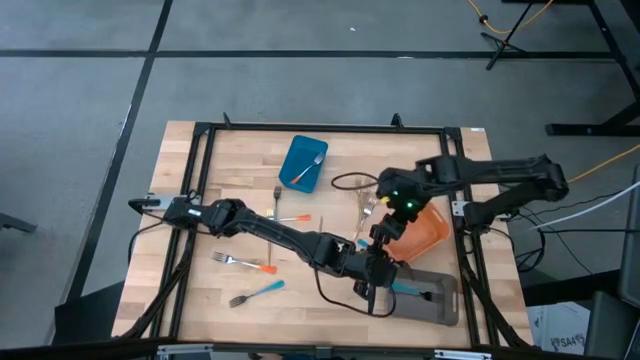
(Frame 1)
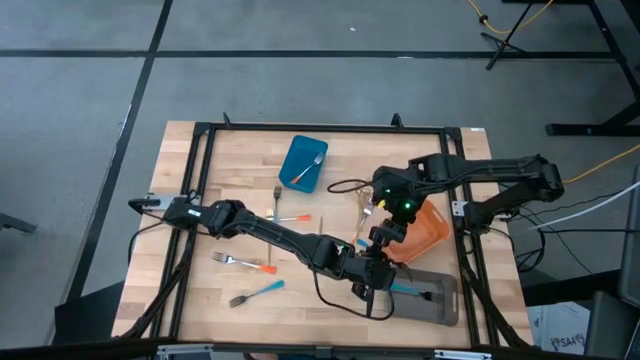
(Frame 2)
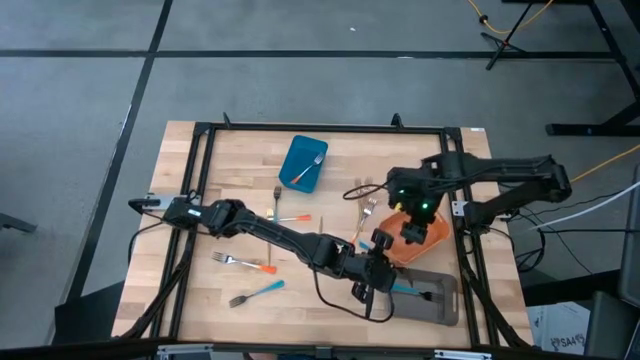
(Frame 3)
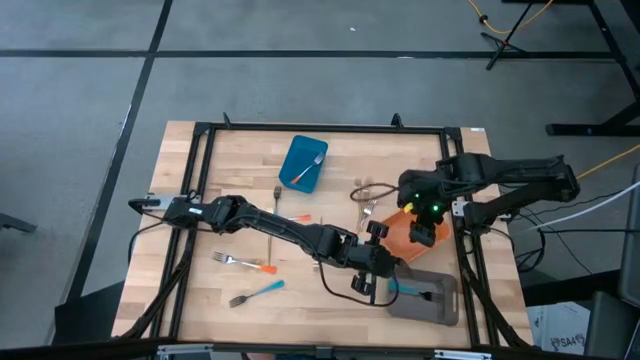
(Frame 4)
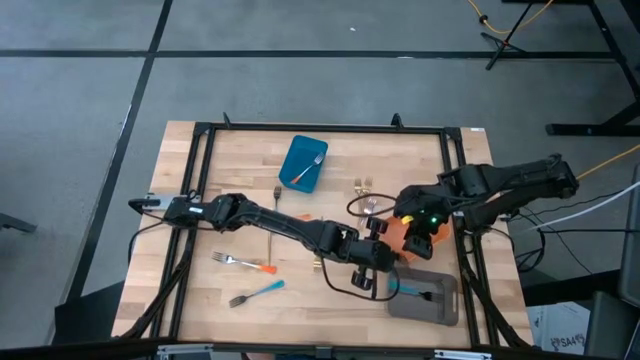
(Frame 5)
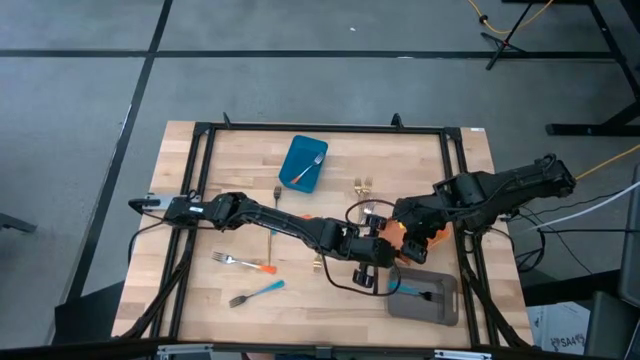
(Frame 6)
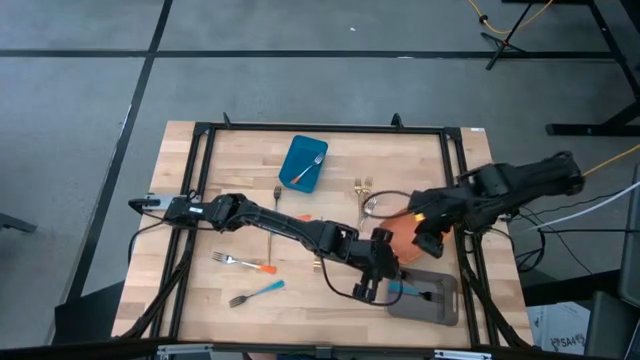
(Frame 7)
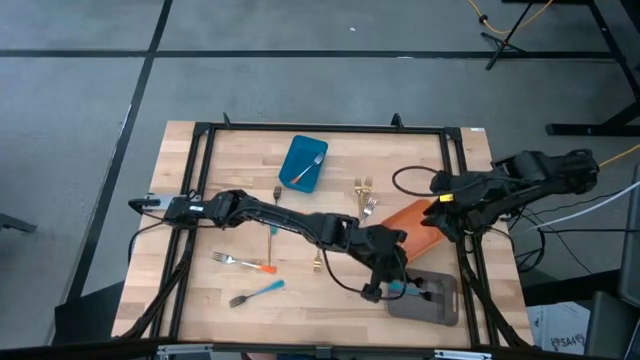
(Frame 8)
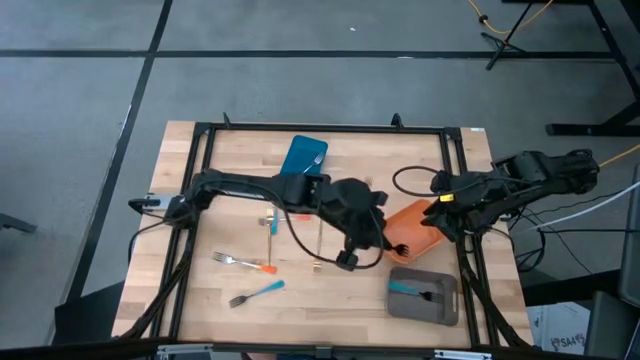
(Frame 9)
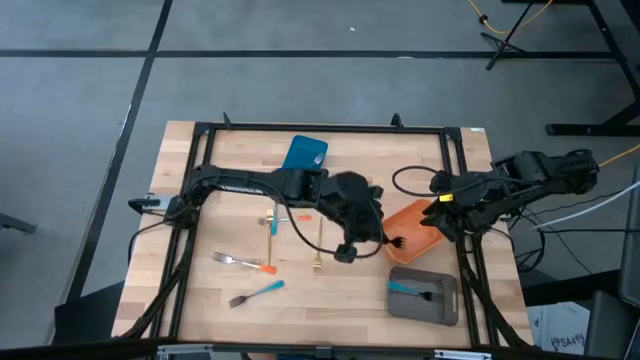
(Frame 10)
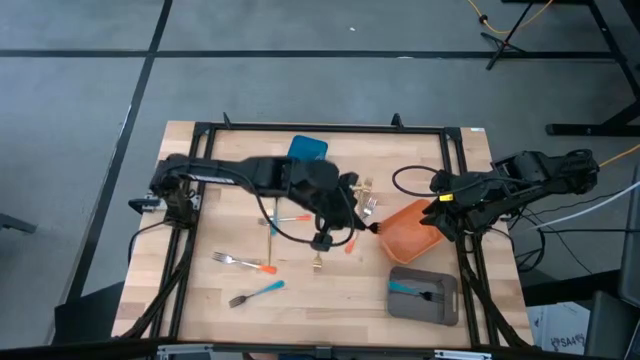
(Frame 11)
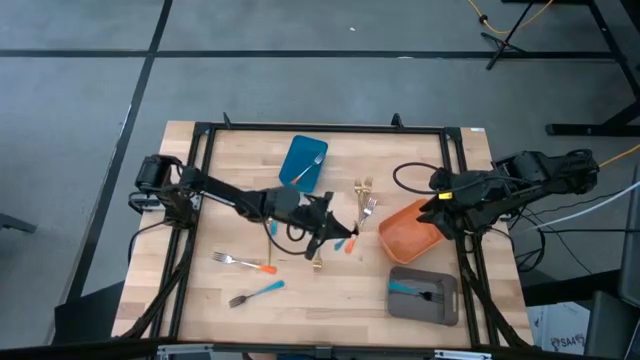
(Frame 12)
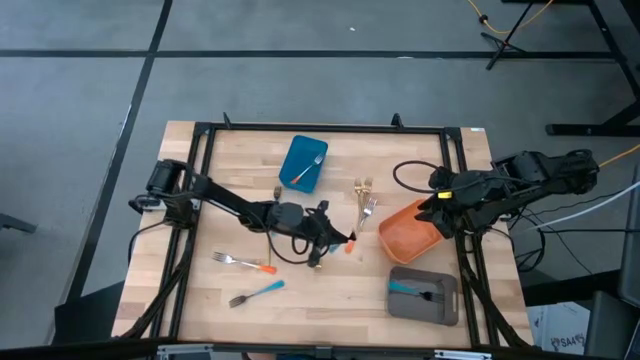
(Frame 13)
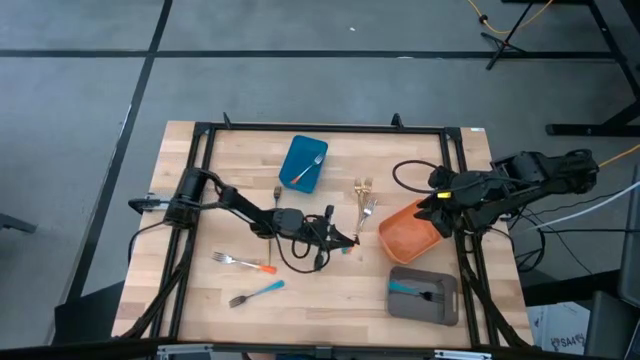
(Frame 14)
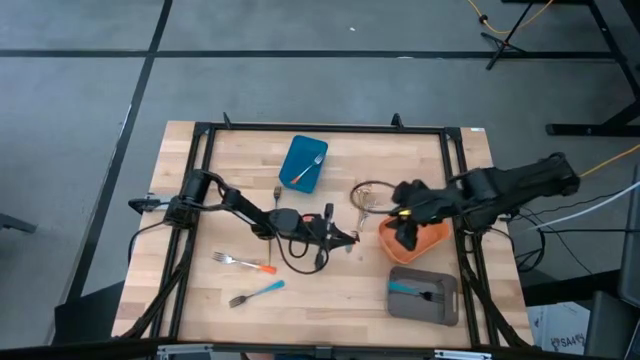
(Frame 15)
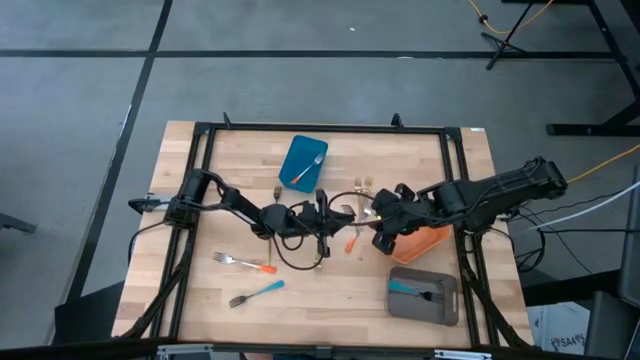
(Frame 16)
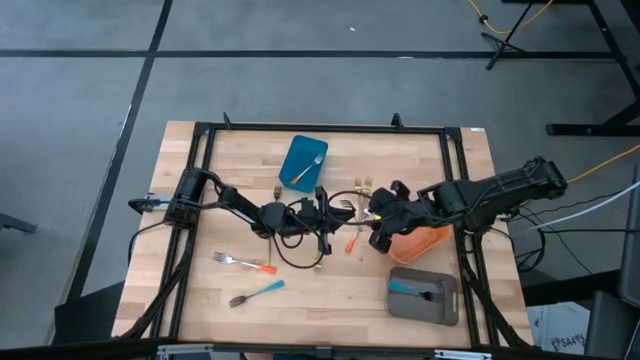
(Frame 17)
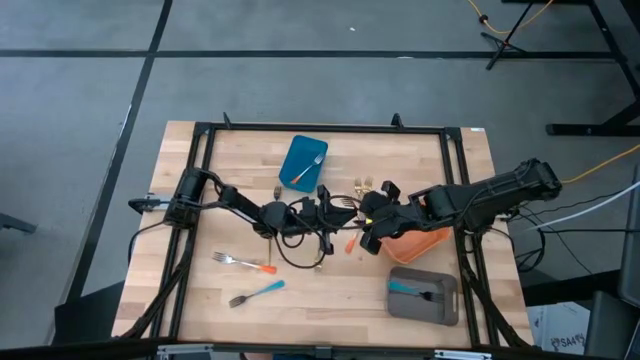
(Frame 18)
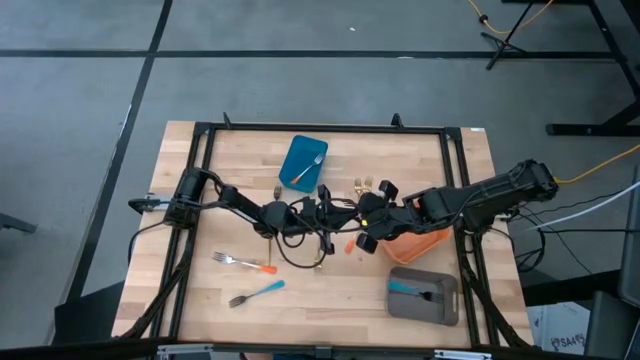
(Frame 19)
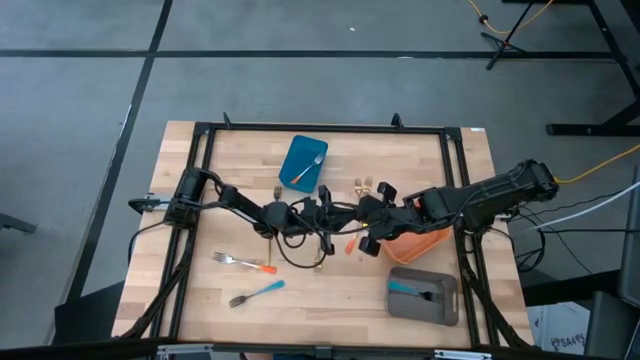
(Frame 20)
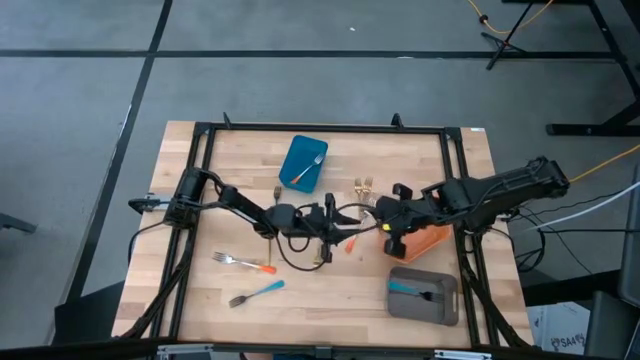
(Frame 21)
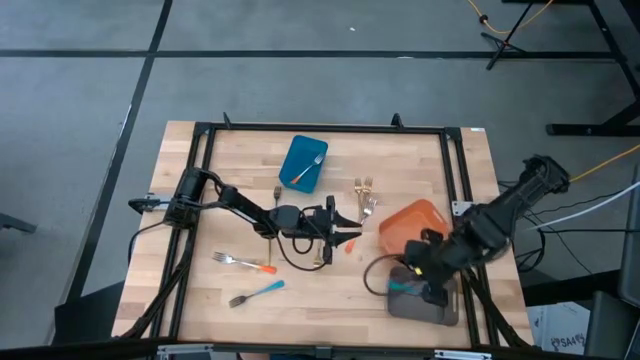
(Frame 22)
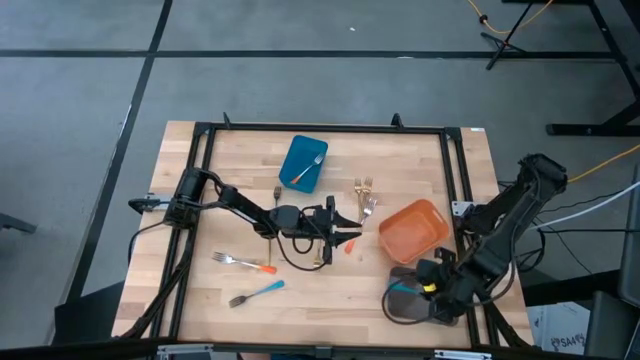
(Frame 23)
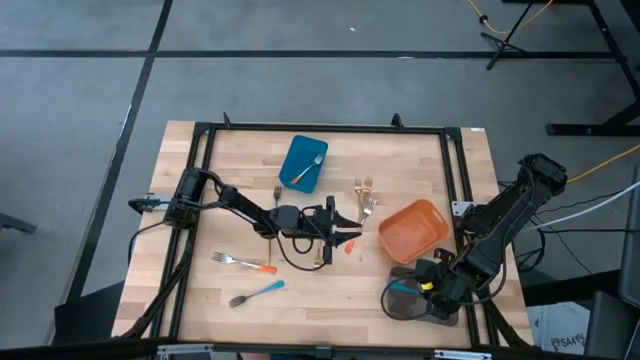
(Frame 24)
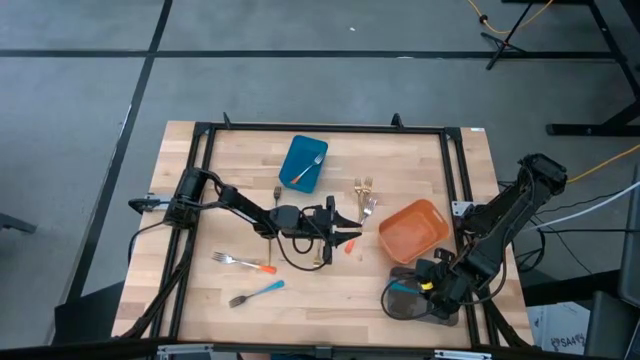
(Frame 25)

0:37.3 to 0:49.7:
Task: Sort silverware by color (type)
Put the right blue fork into the black bin

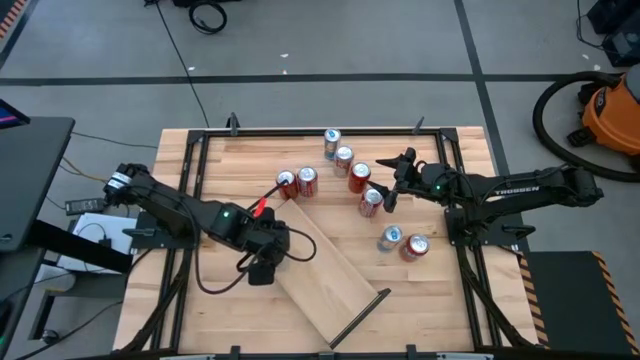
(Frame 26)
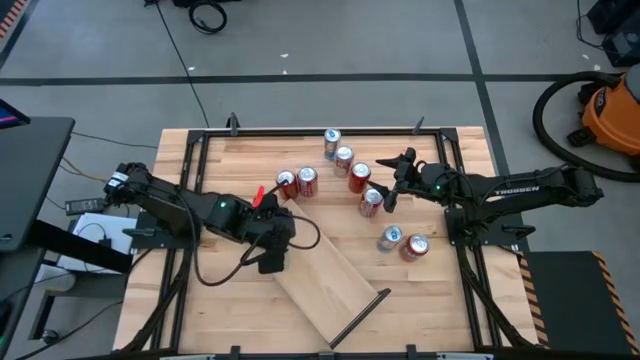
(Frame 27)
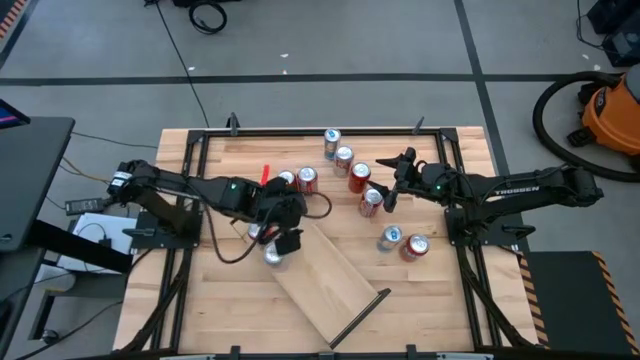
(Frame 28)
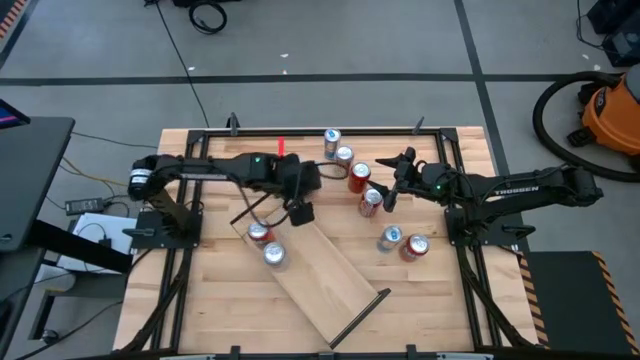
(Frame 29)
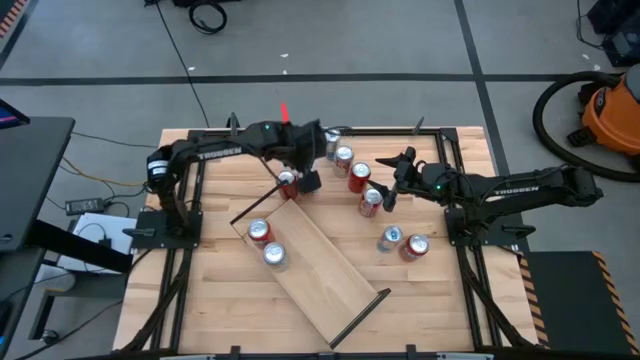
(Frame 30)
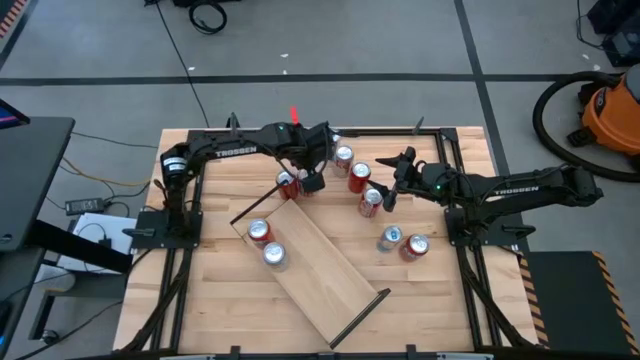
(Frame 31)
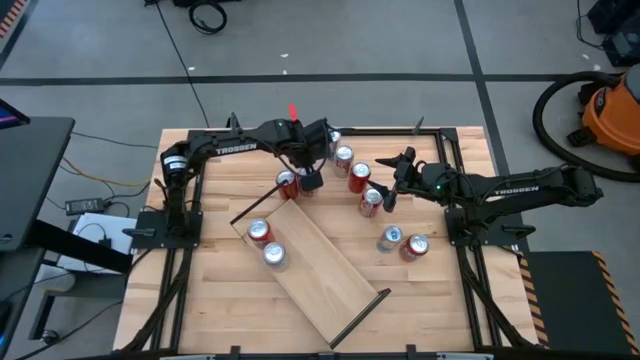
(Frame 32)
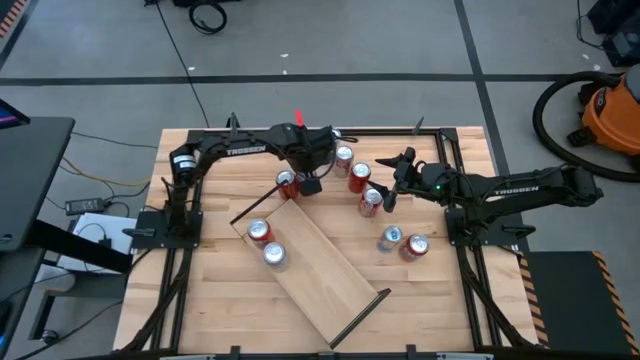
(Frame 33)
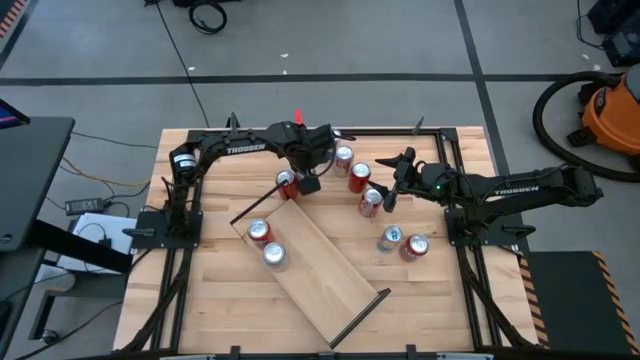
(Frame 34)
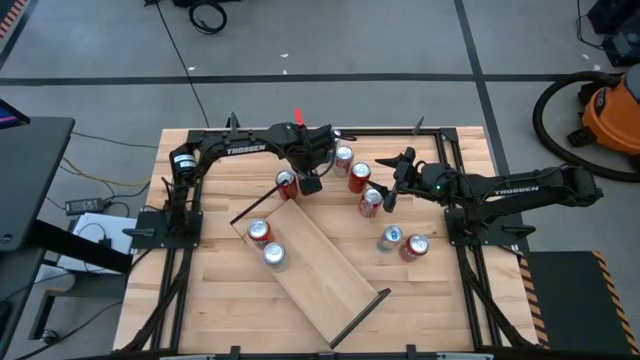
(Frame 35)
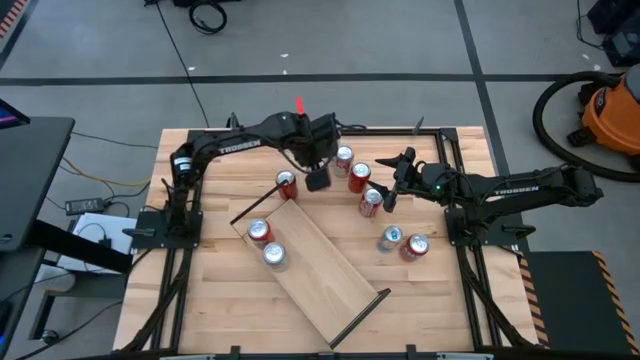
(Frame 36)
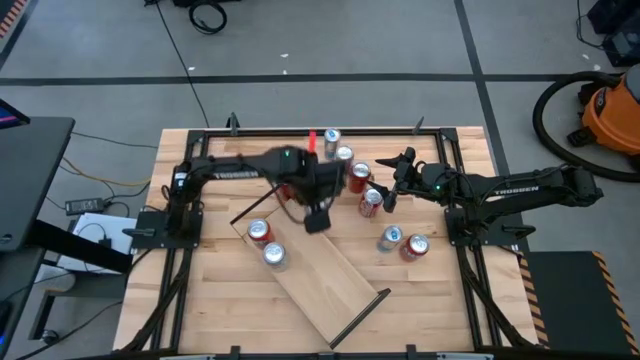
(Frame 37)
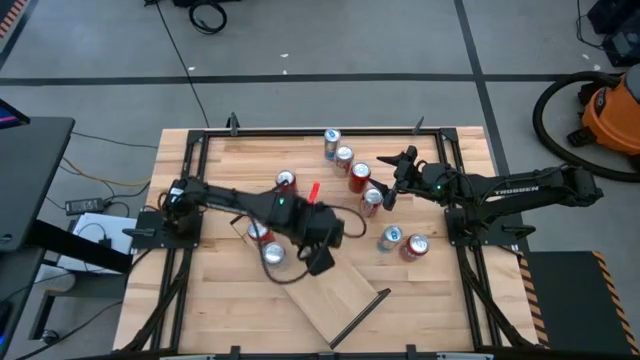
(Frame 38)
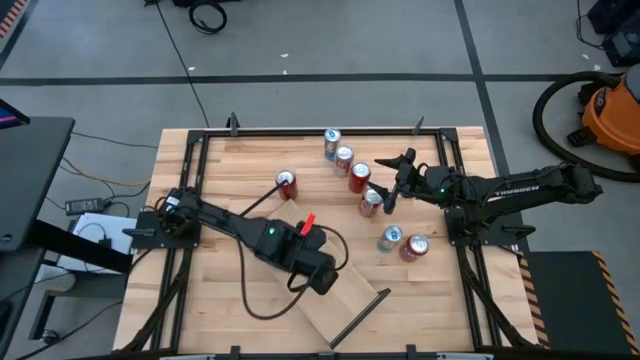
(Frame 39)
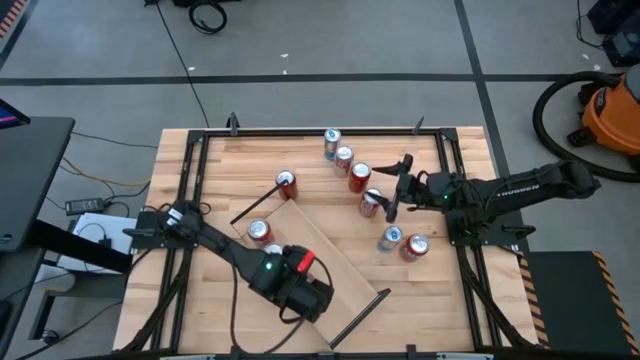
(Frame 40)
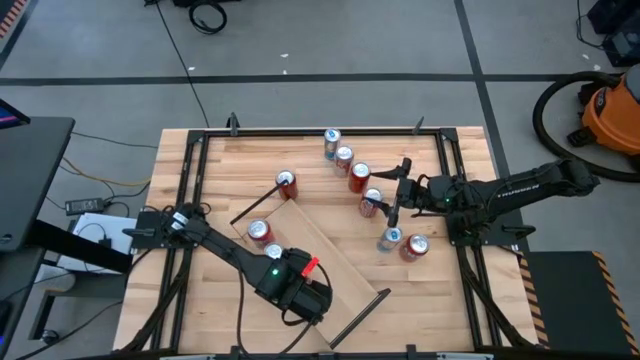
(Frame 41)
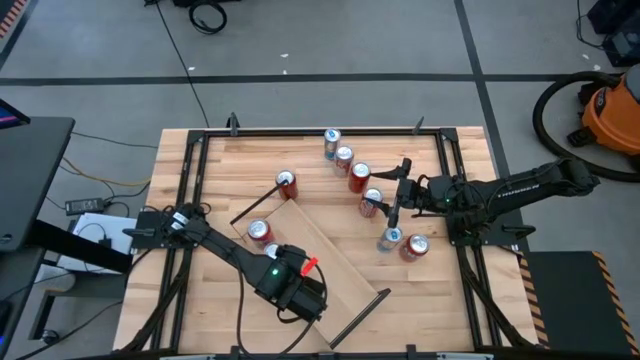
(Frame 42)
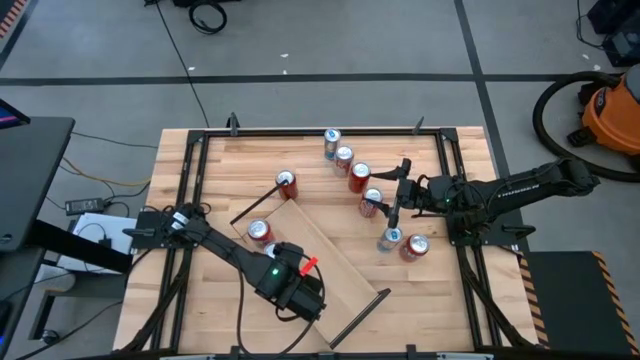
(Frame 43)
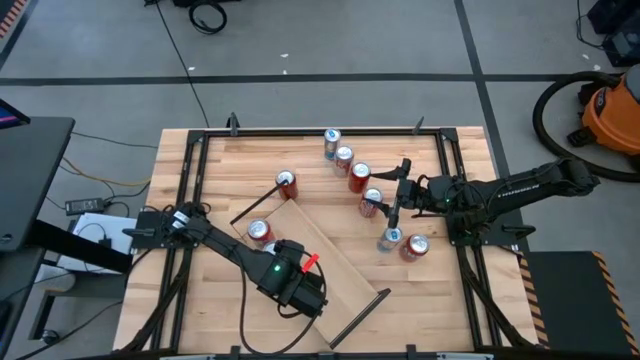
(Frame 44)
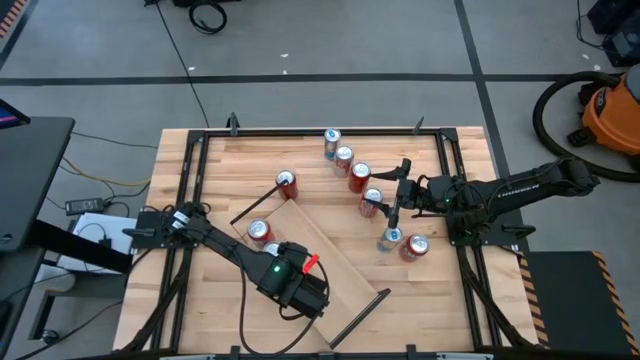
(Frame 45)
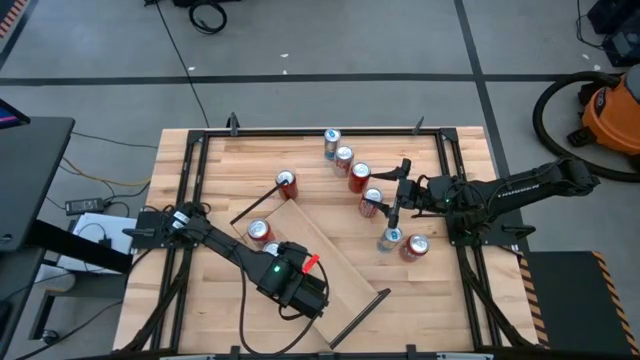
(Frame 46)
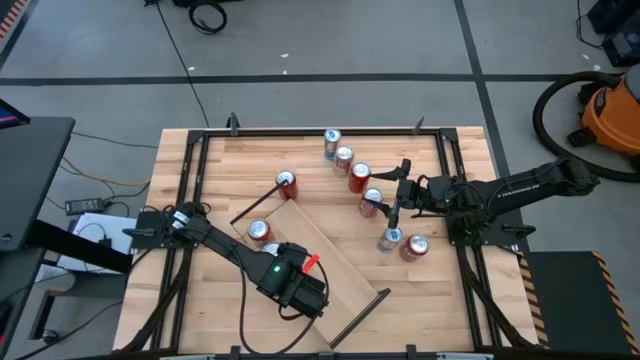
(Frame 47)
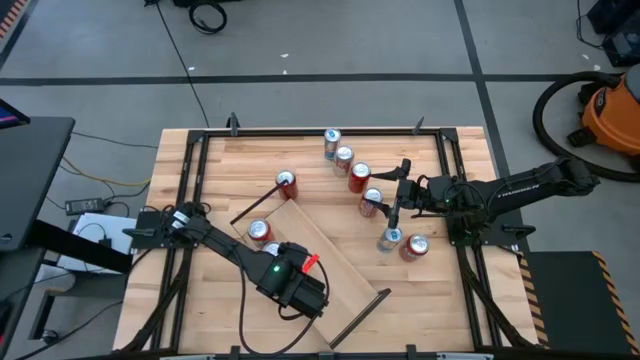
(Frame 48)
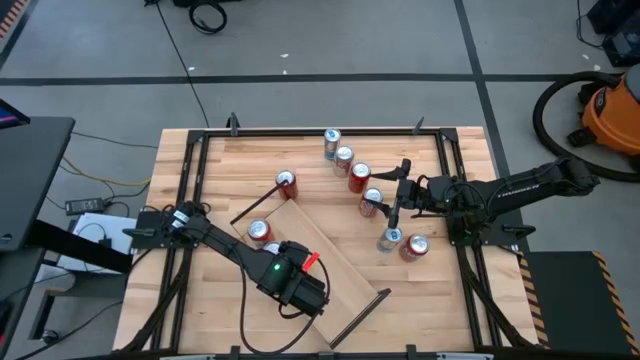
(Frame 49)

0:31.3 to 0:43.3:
Task: Place canned beverage on shelf
Put the top left red soda can on the shelf
